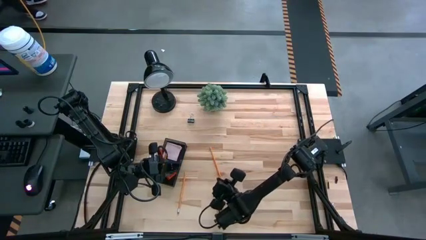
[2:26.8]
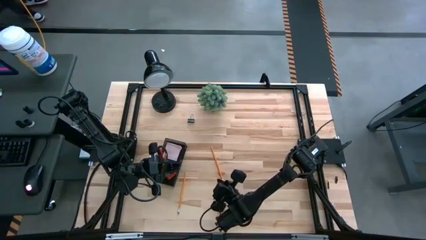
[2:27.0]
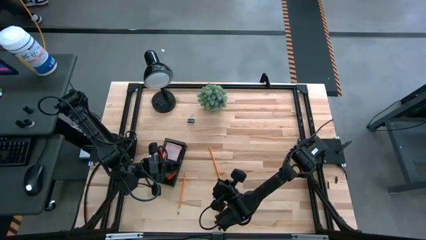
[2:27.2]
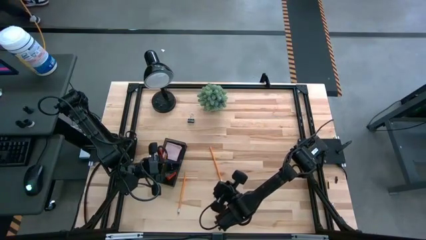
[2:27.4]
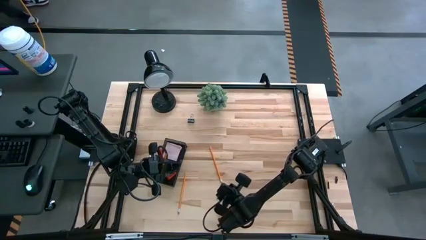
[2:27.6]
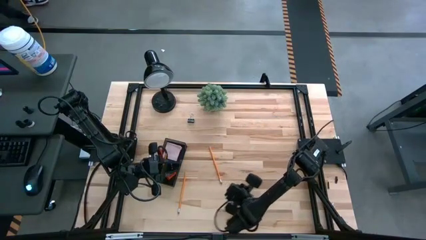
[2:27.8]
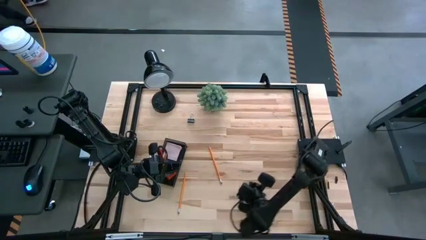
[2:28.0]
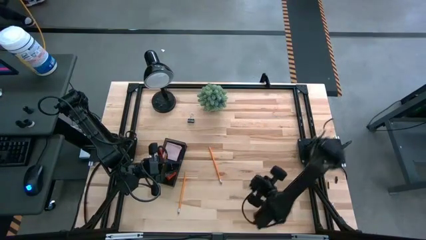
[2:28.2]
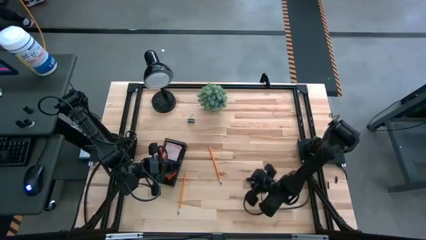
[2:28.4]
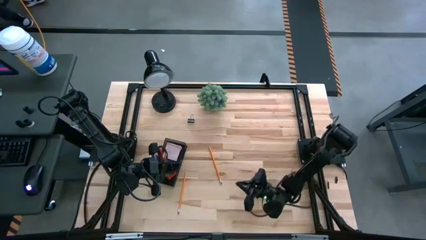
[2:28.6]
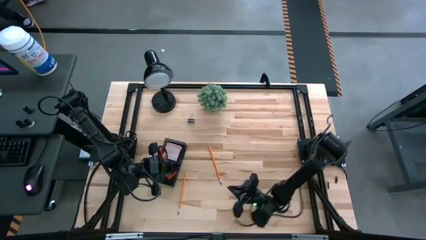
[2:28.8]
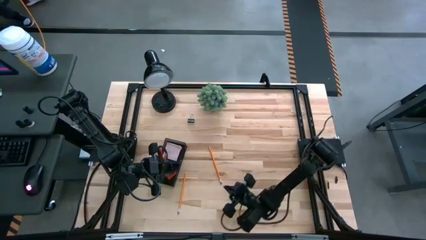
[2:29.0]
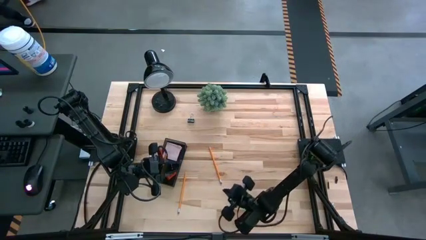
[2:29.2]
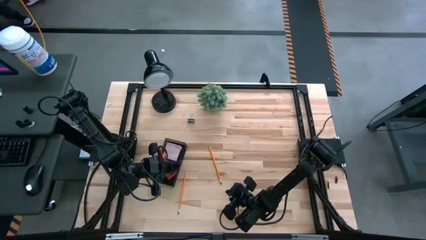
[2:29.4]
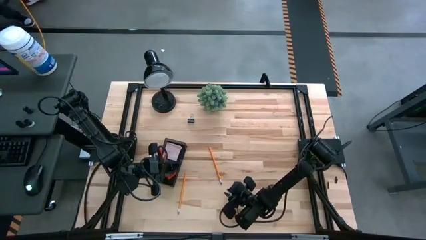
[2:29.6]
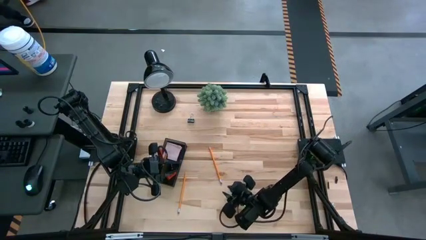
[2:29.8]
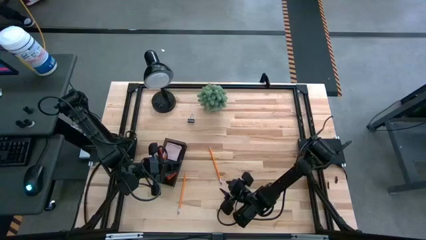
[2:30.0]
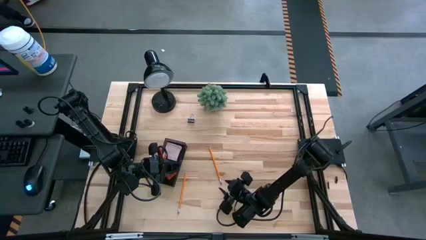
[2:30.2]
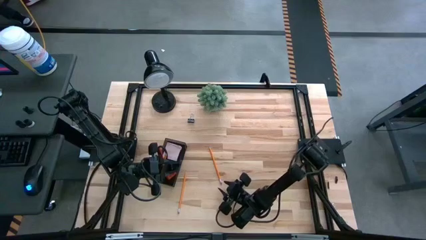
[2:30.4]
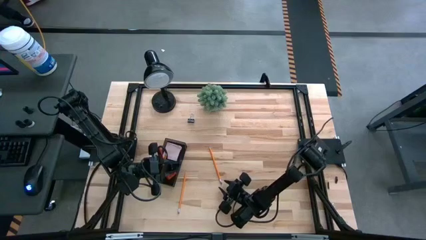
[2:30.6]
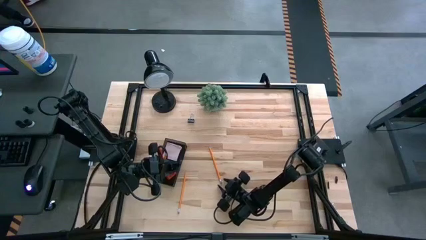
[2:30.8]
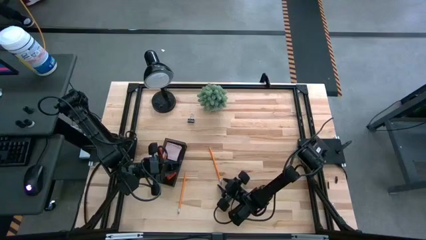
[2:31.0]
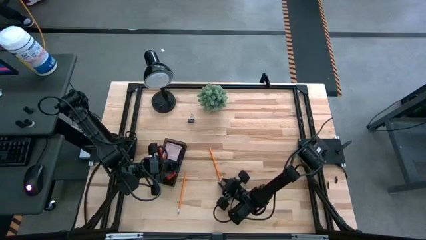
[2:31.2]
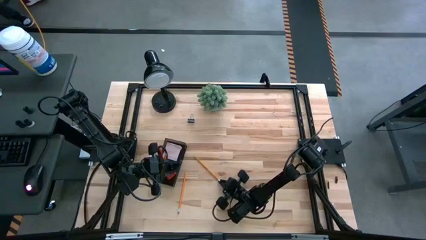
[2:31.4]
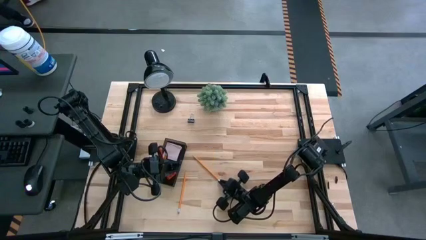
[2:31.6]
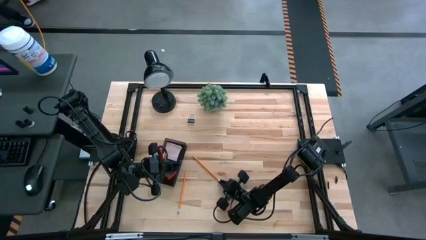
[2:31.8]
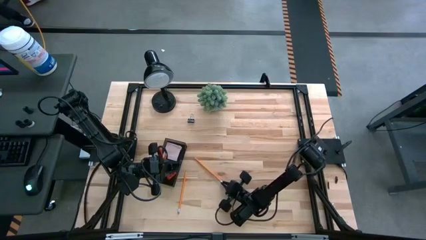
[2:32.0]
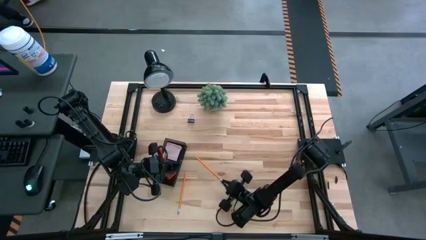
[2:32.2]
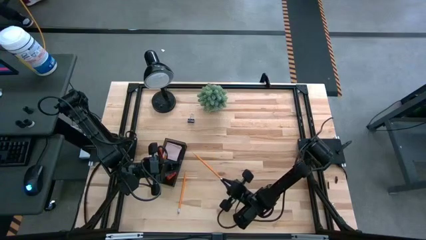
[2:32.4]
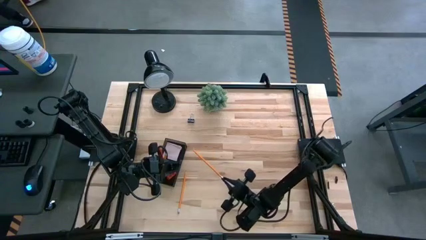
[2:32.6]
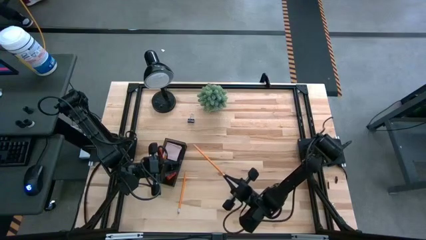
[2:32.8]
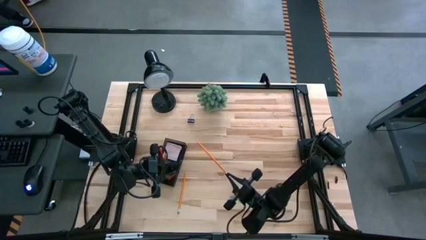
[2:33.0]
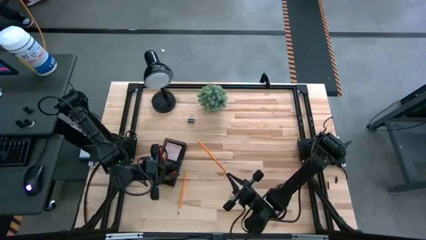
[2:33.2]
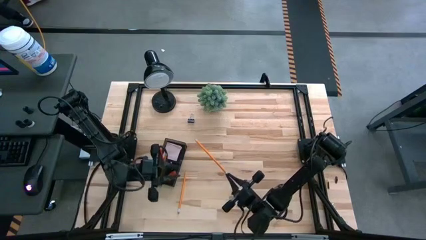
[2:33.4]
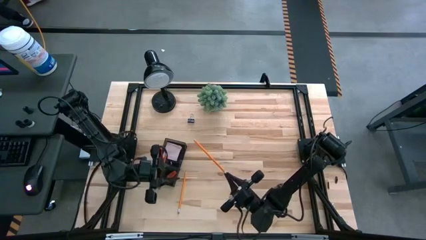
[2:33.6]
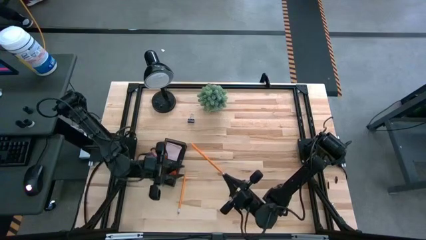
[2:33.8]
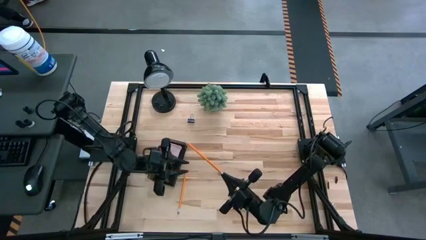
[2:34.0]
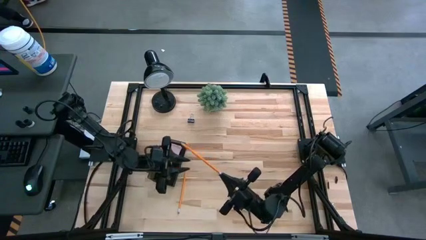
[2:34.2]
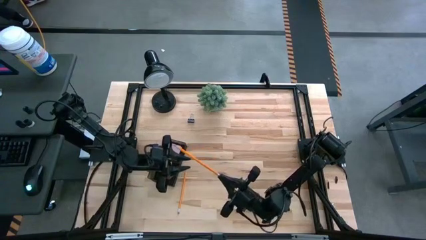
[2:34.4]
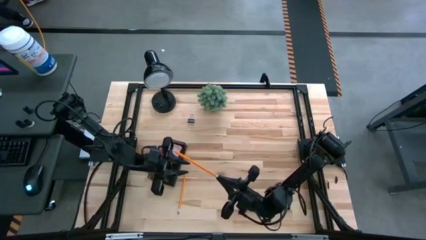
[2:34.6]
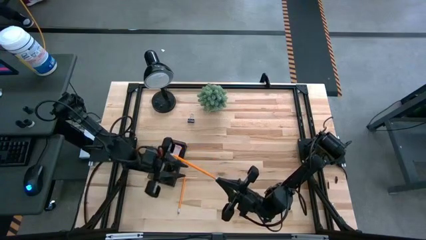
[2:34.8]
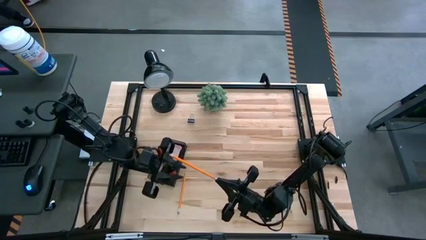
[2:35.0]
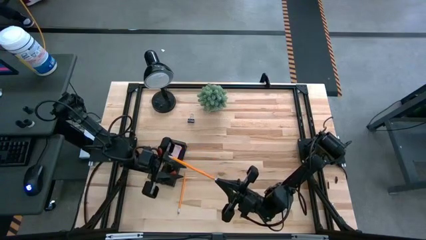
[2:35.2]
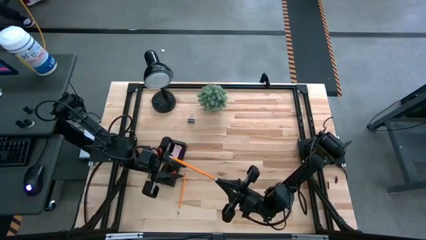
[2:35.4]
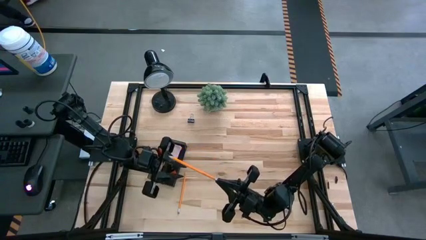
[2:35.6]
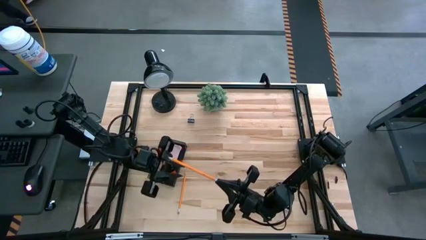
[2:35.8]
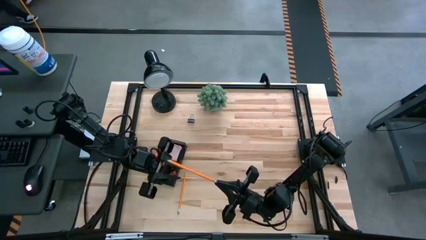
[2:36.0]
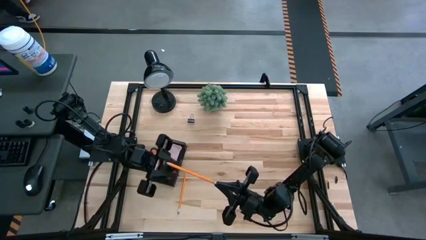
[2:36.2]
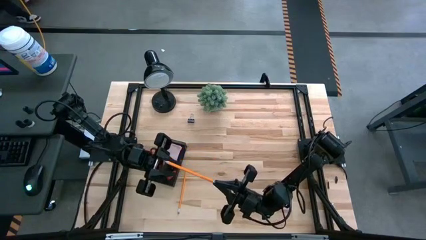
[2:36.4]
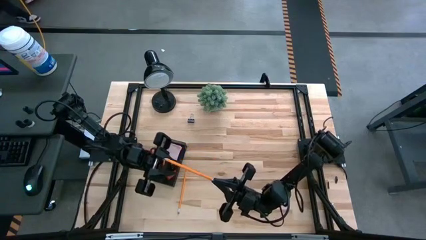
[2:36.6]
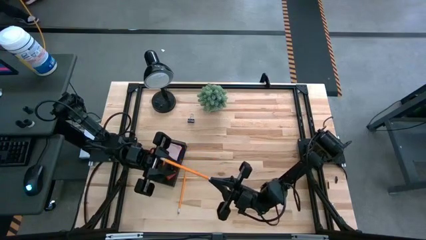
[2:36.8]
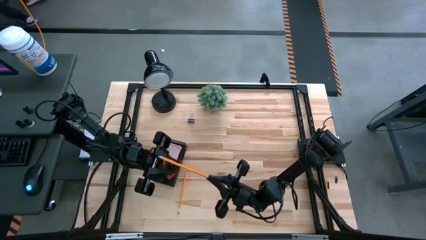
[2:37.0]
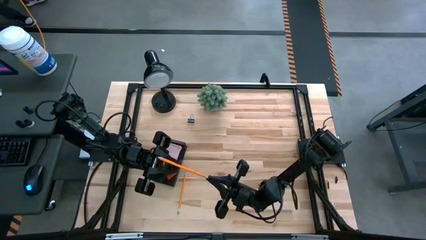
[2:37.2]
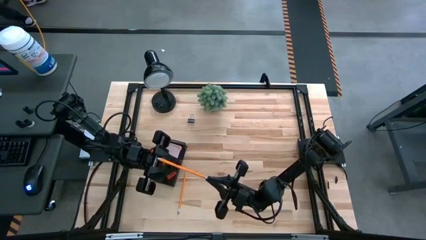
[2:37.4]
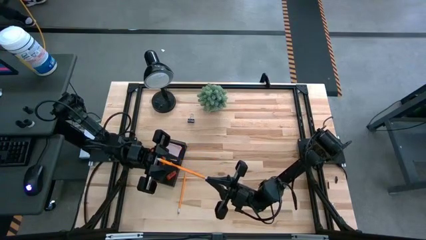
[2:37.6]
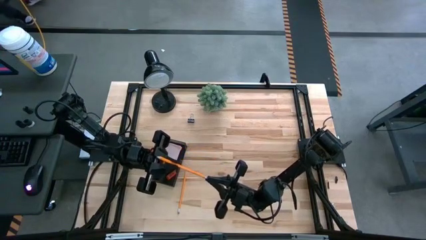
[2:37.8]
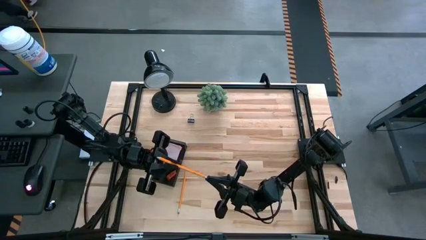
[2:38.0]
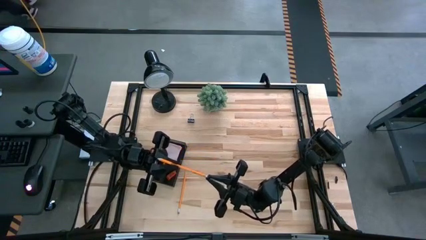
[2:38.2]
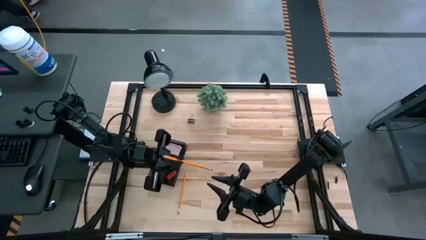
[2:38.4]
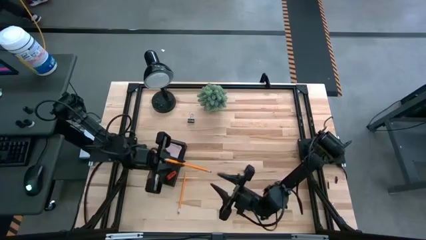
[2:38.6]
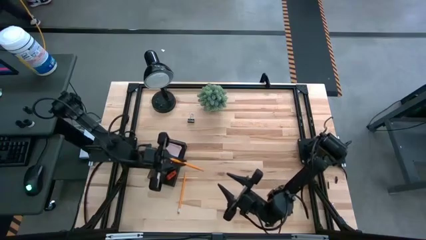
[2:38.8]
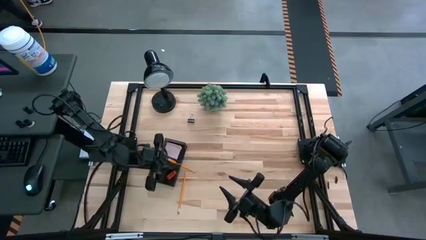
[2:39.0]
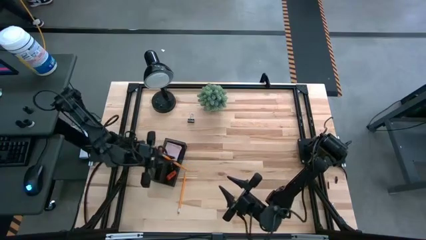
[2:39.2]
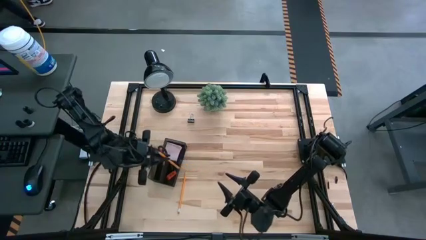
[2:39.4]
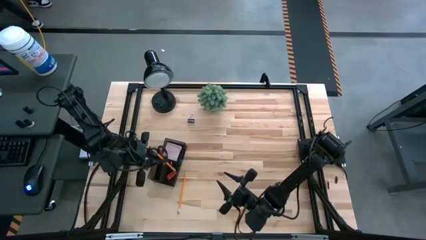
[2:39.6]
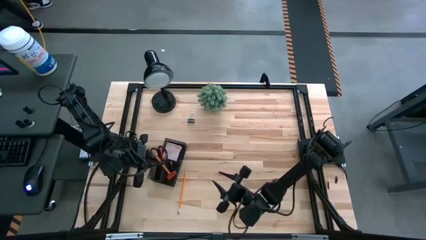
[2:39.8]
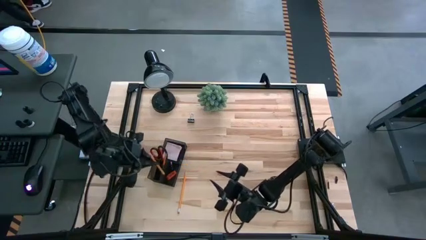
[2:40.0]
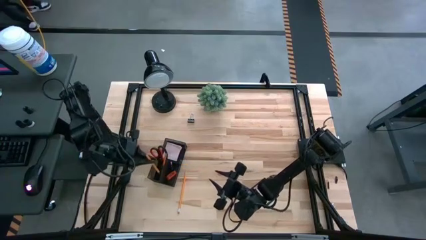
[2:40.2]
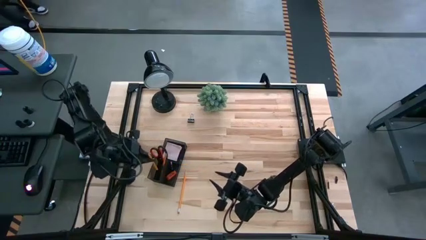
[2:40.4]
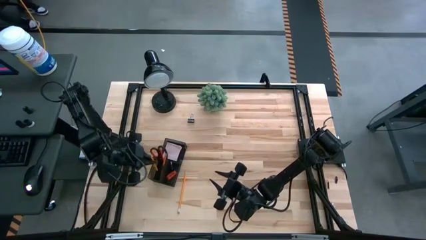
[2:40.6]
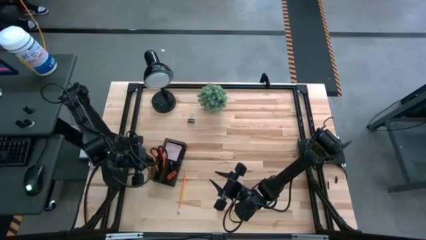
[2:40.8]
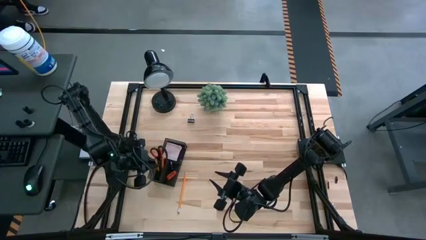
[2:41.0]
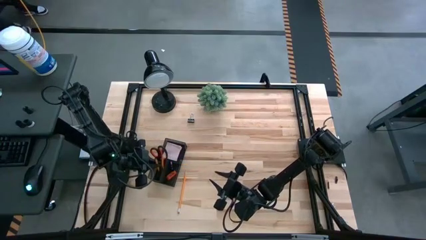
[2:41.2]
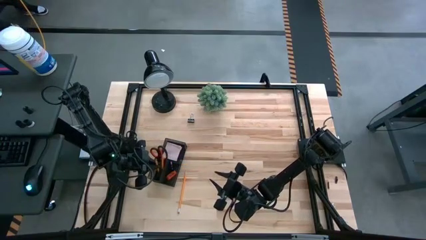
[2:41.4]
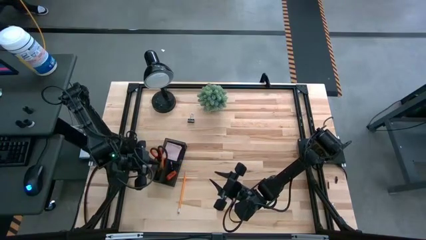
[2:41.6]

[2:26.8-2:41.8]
Task: Pick and place office supplies into organizer
Put the right orange pencil into the desk organizer
